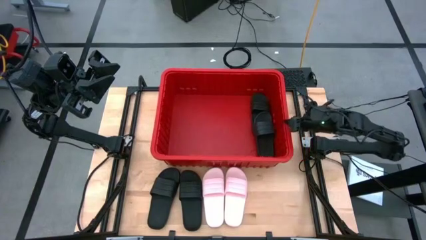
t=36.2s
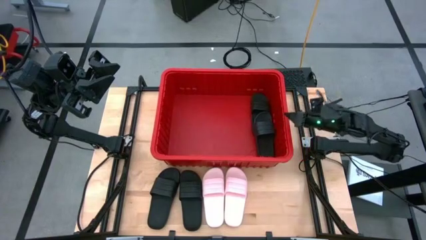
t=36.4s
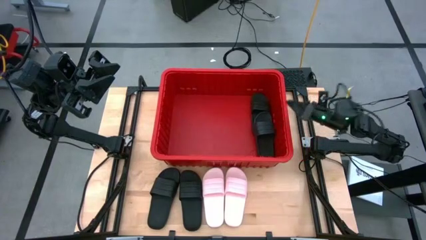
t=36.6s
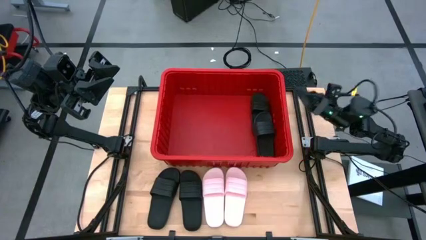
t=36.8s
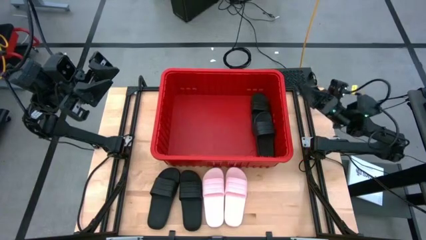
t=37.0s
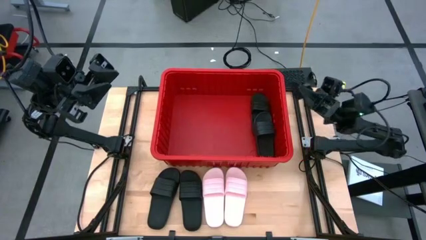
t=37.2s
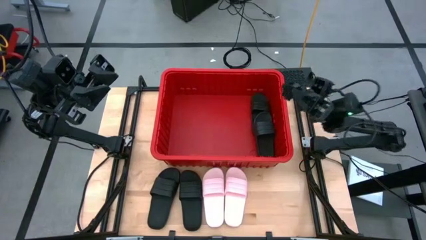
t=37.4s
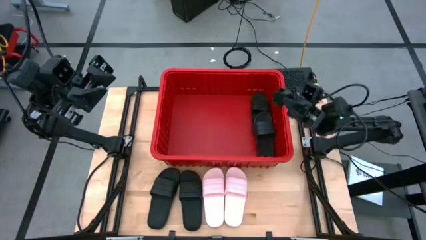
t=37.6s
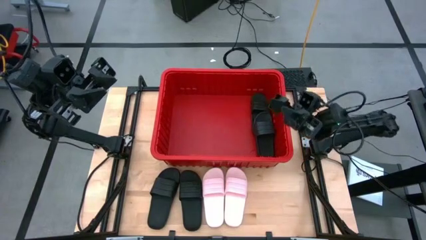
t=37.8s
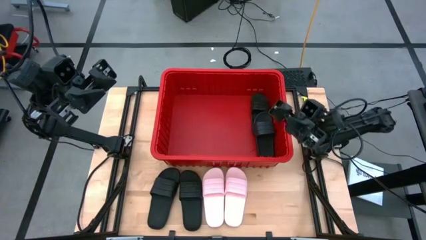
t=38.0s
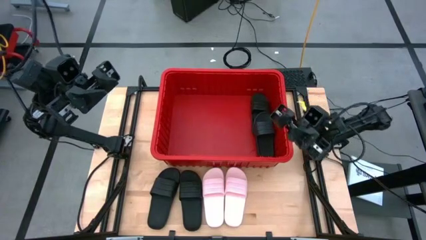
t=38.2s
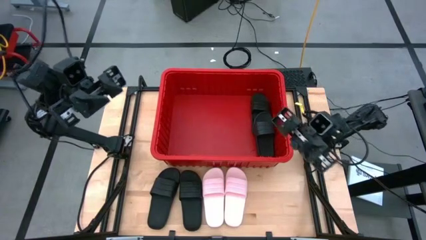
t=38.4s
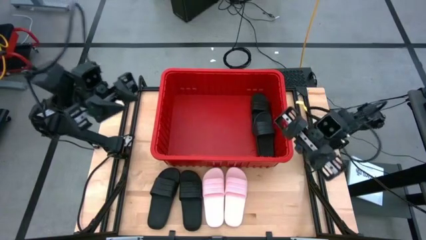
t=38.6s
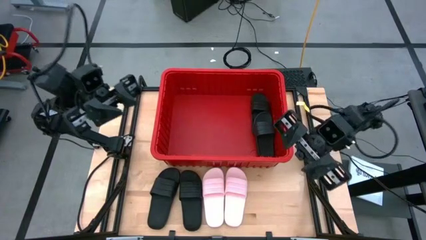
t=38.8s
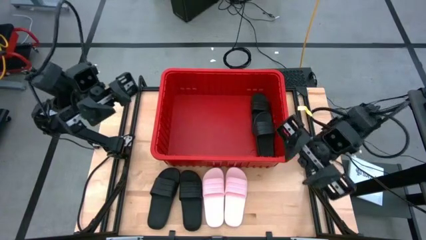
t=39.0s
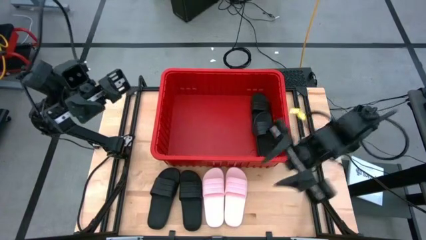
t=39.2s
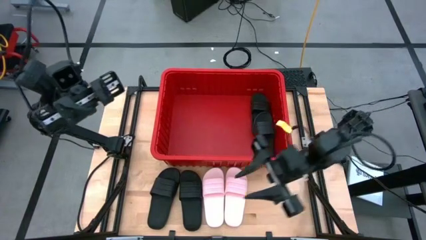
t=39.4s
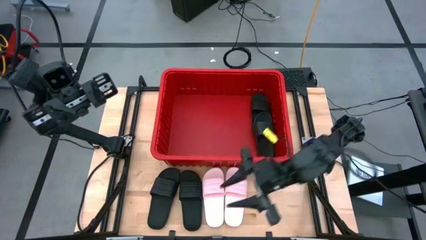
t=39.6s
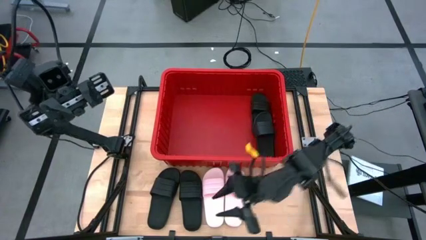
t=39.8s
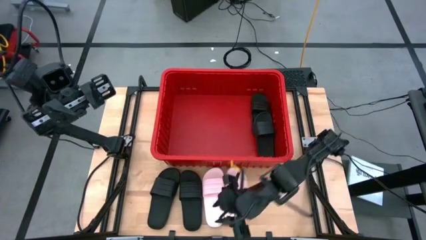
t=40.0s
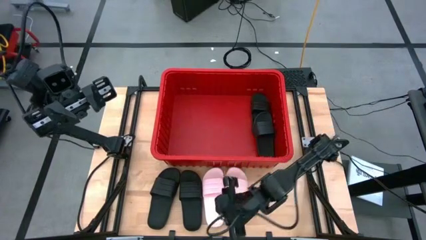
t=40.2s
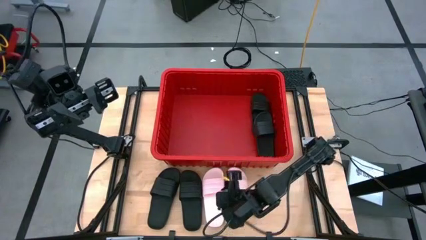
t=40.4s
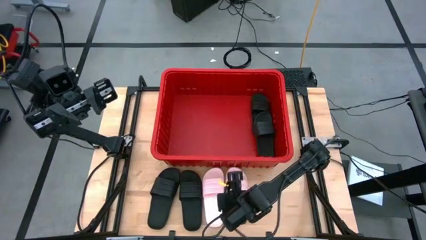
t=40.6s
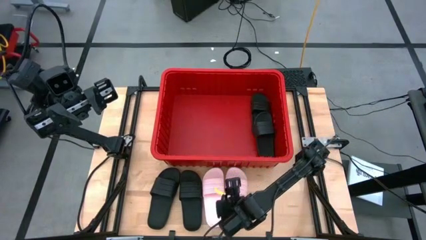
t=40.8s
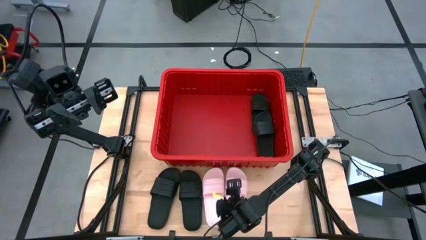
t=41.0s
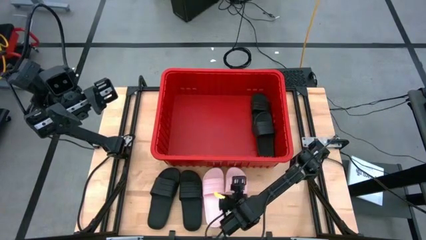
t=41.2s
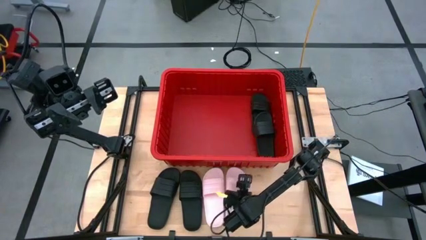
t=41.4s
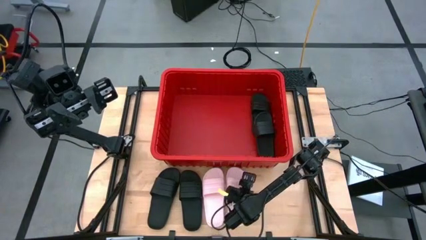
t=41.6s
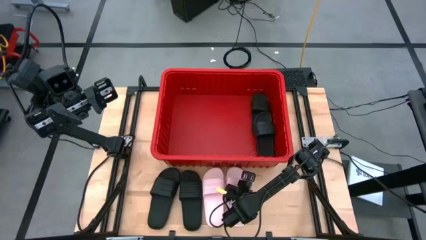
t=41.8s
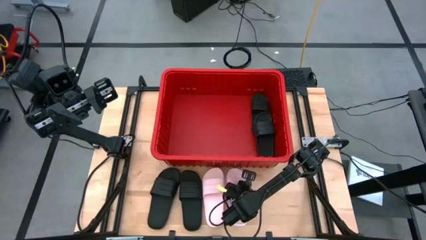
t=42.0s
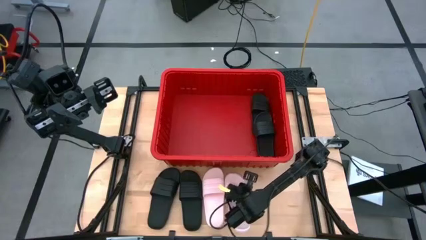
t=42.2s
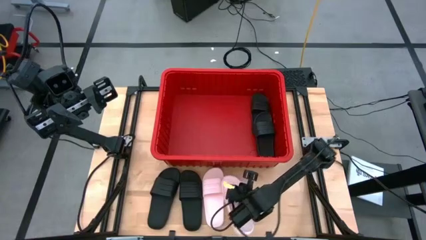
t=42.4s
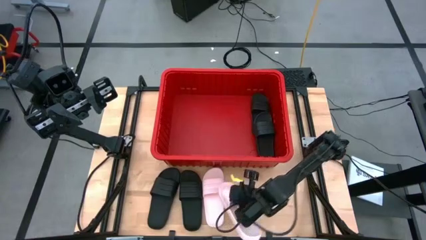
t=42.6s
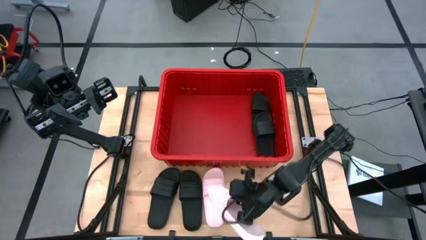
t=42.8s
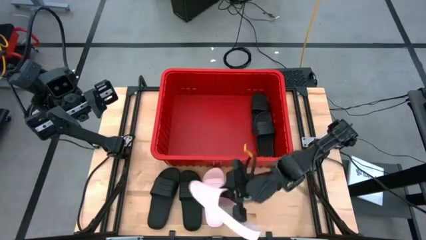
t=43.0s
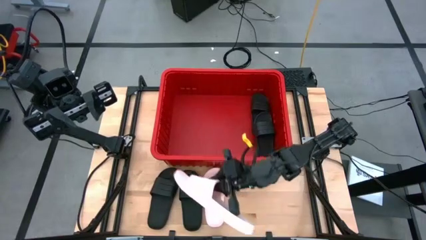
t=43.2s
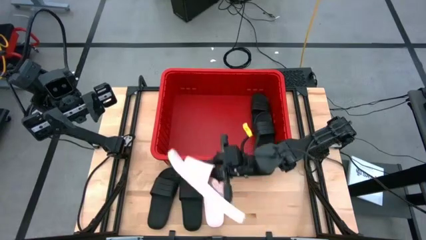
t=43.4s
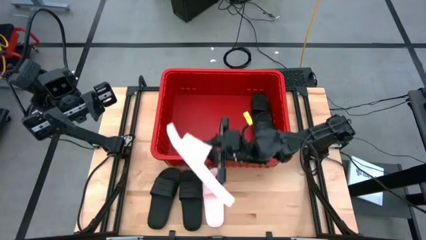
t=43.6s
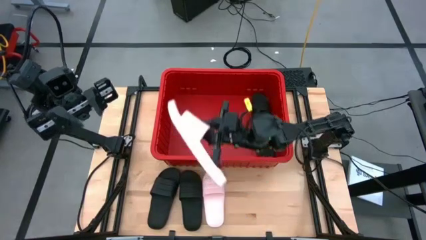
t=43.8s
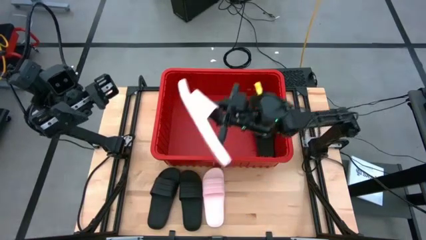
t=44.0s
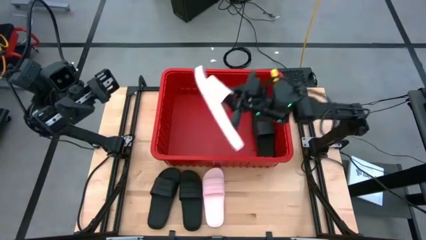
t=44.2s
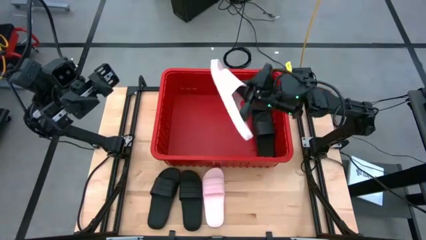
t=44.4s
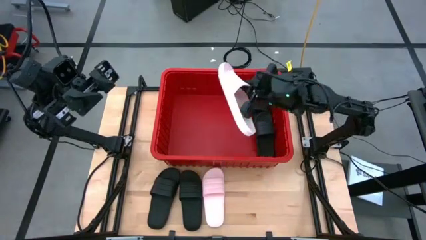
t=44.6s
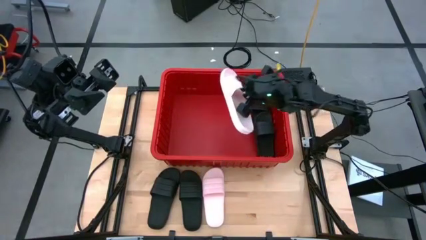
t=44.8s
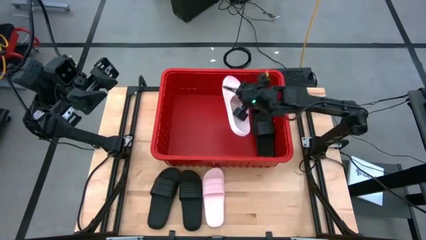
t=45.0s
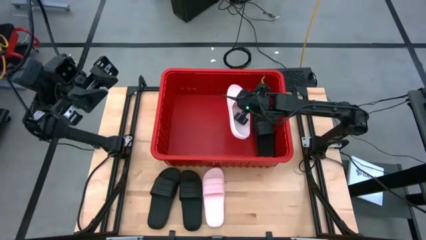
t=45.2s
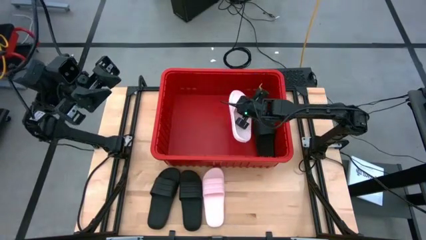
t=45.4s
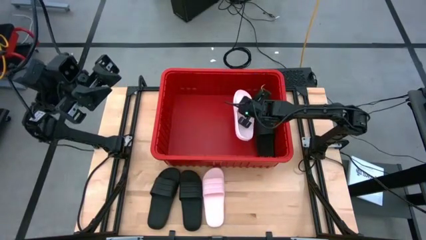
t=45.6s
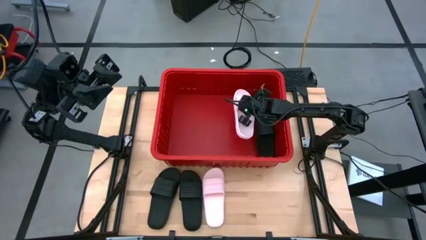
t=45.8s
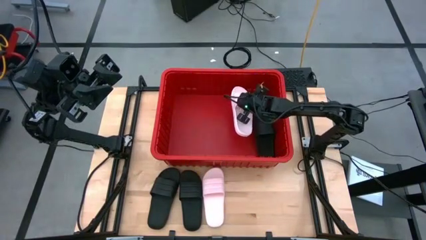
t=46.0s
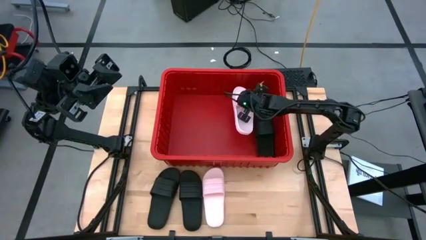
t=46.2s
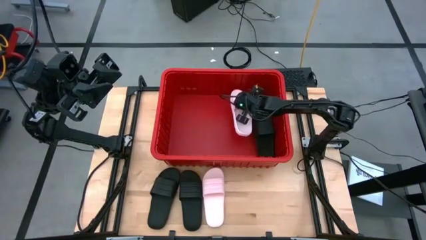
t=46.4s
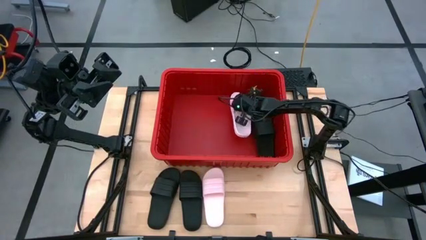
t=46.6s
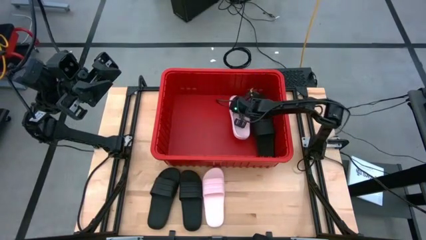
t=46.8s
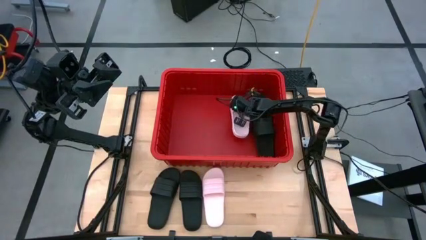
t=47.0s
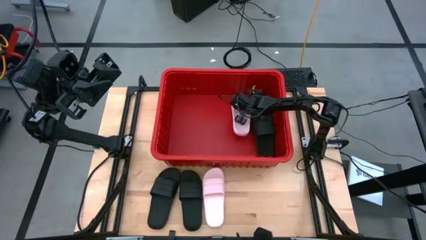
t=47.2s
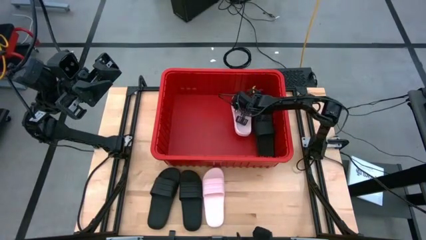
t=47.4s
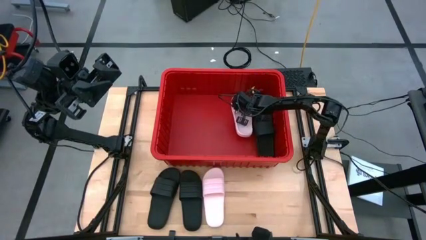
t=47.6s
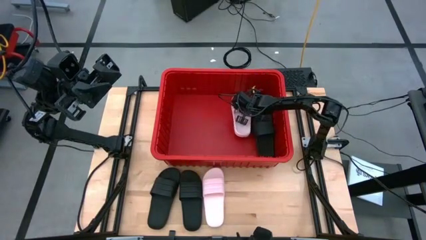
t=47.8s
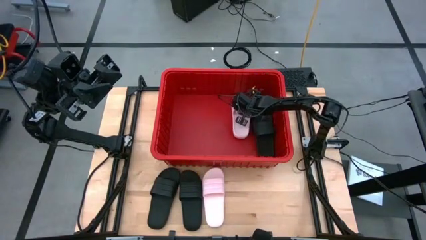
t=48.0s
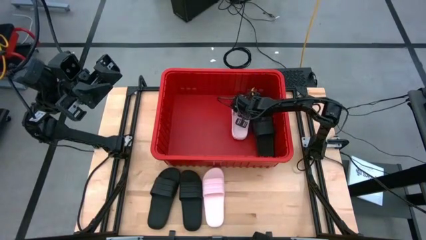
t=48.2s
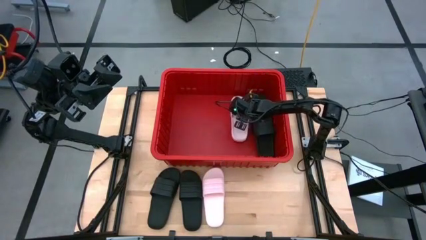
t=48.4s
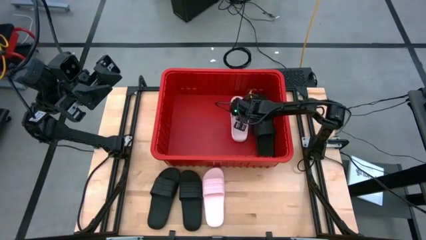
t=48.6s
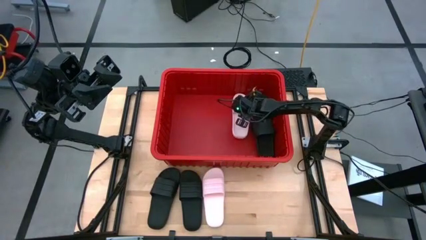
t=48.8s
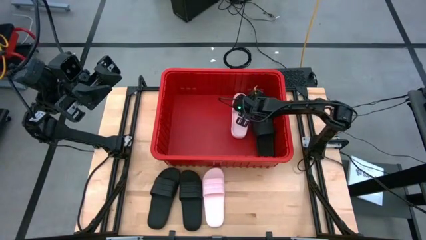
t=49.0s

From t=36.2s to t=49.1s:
Task: Pick and place slides into bin
Put the right pink slide into the red bin
